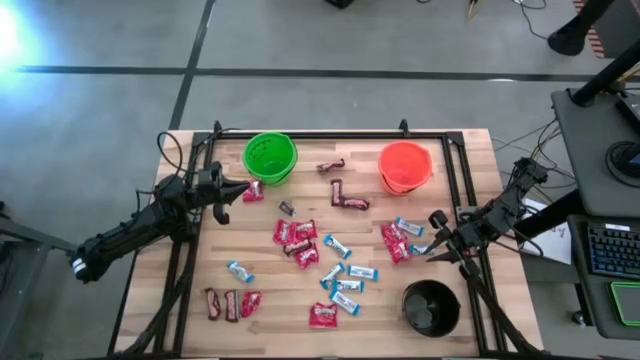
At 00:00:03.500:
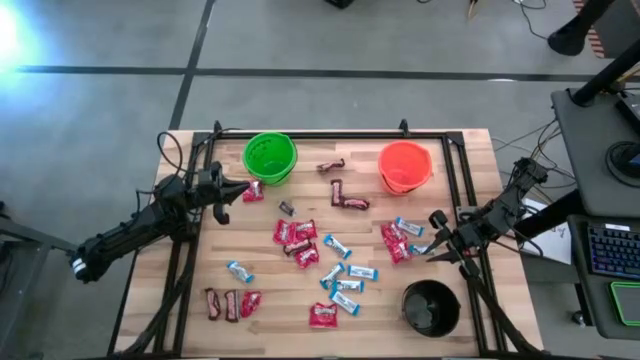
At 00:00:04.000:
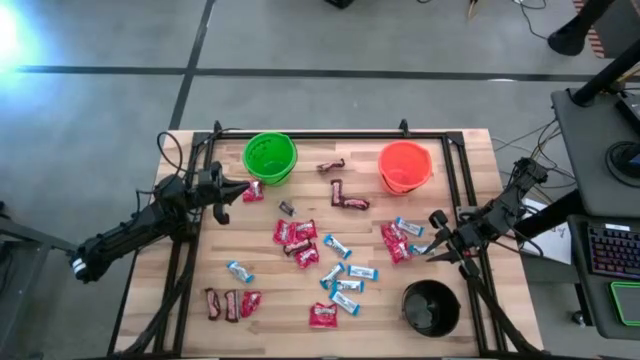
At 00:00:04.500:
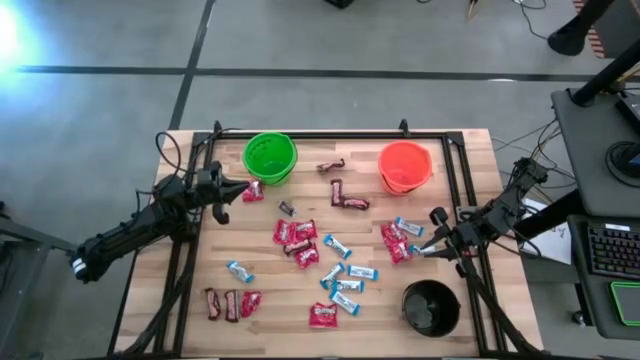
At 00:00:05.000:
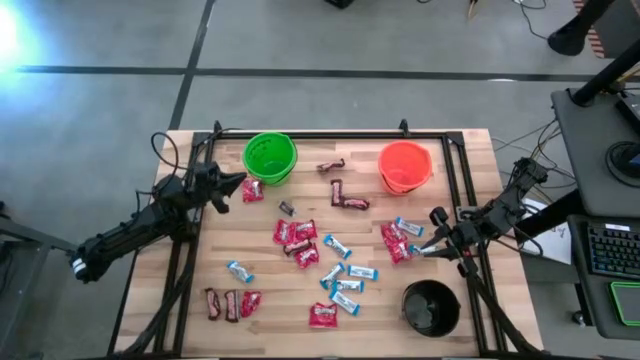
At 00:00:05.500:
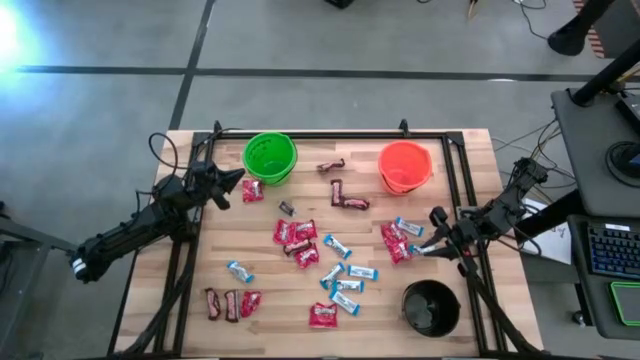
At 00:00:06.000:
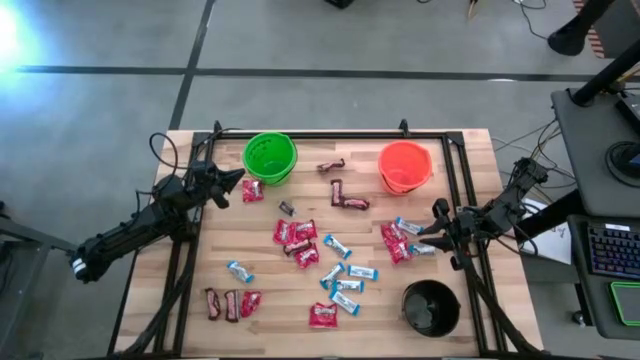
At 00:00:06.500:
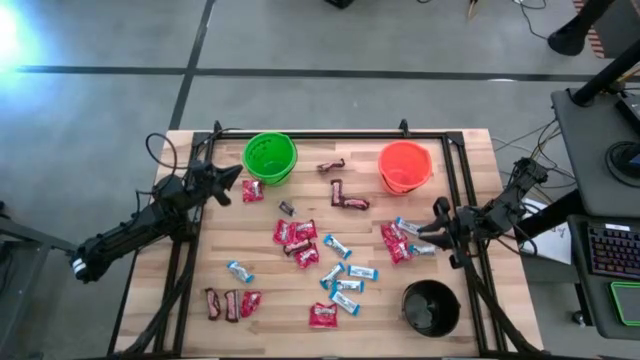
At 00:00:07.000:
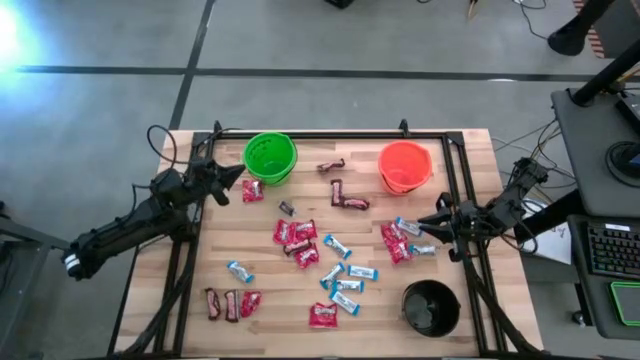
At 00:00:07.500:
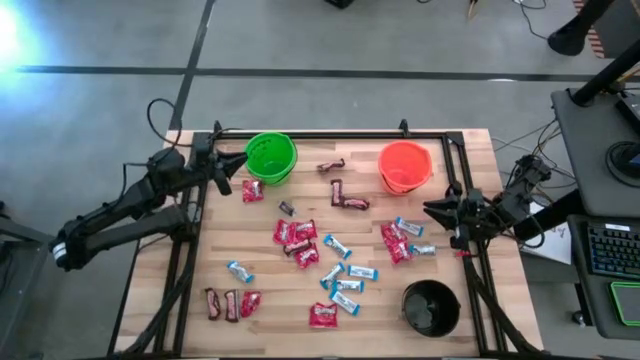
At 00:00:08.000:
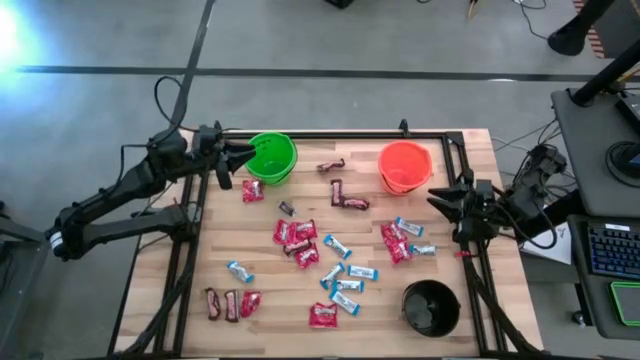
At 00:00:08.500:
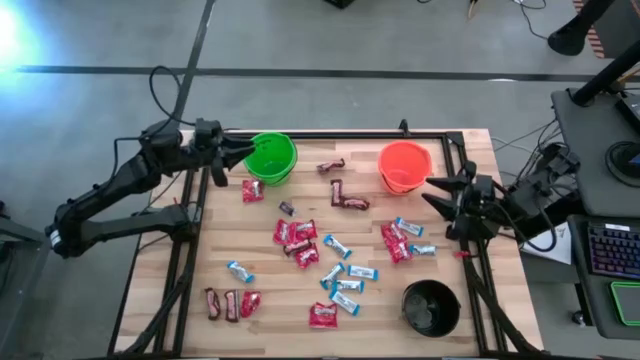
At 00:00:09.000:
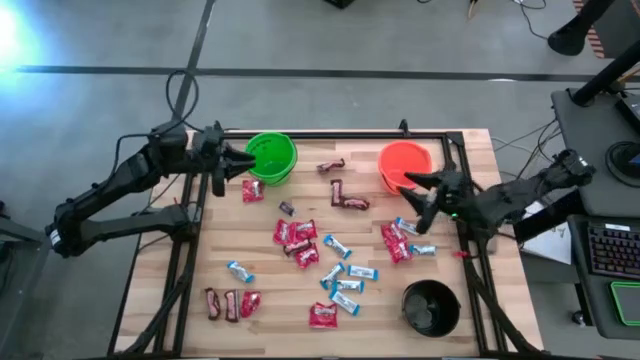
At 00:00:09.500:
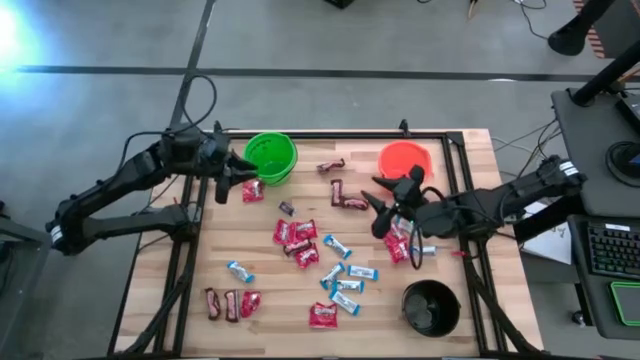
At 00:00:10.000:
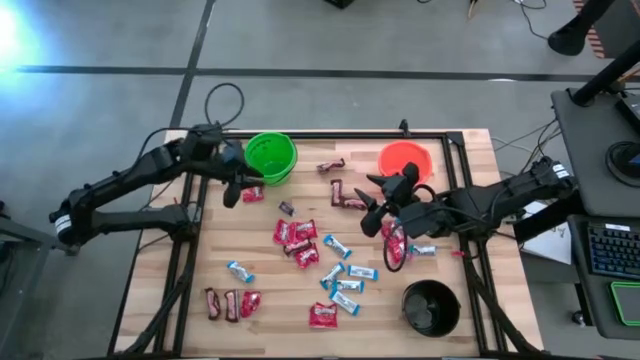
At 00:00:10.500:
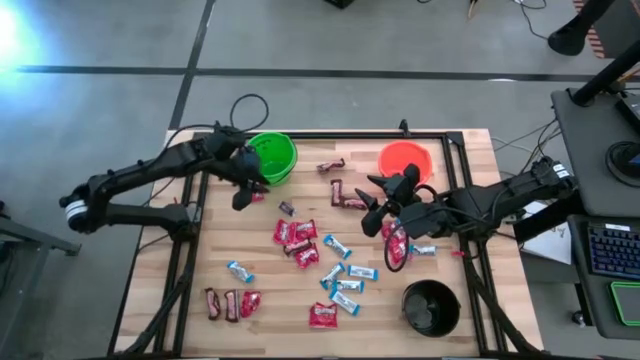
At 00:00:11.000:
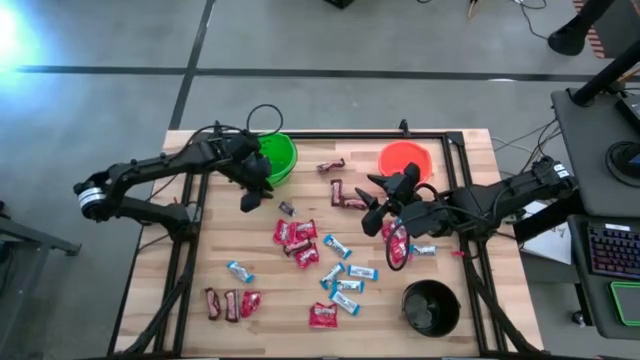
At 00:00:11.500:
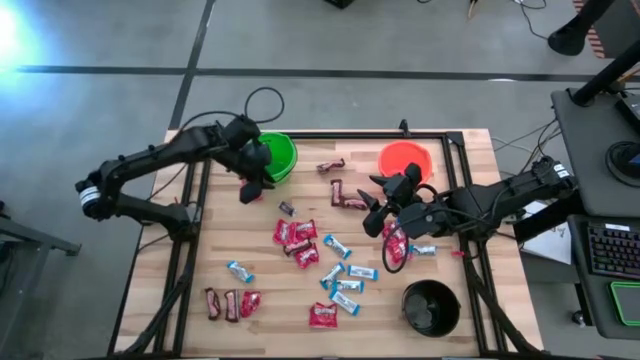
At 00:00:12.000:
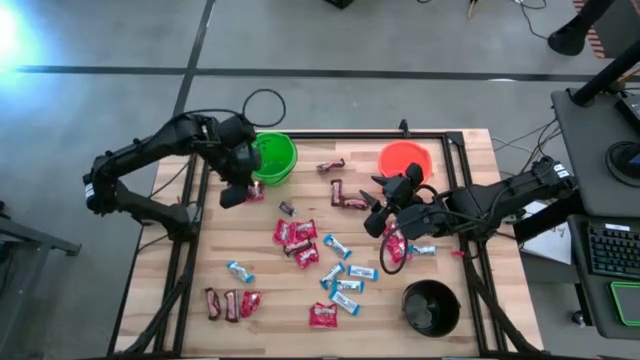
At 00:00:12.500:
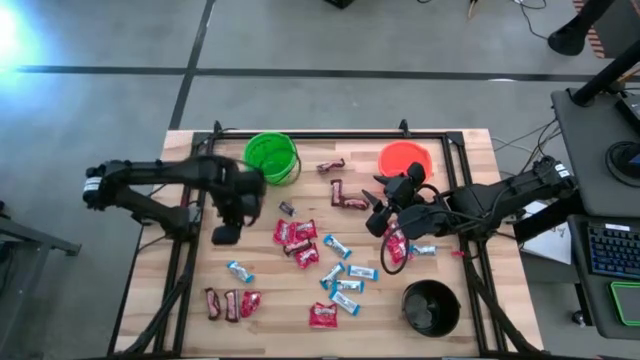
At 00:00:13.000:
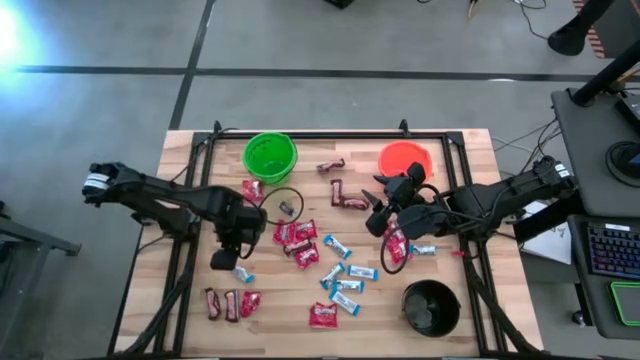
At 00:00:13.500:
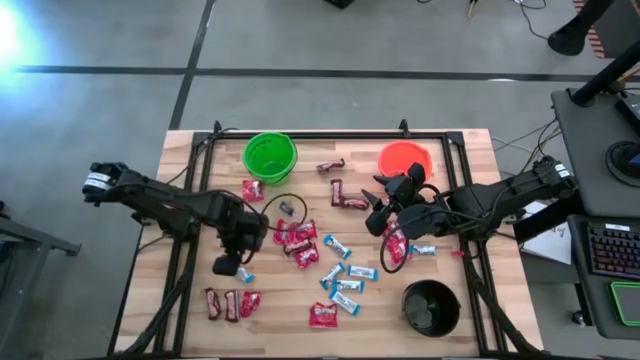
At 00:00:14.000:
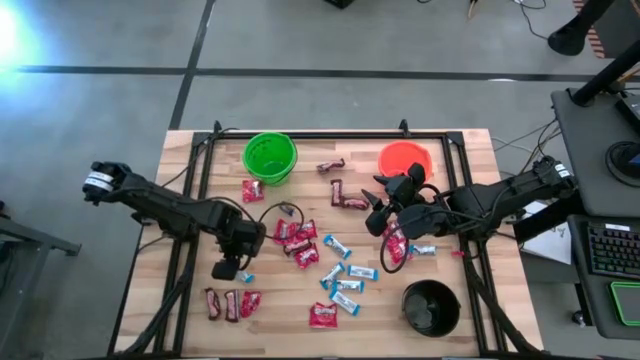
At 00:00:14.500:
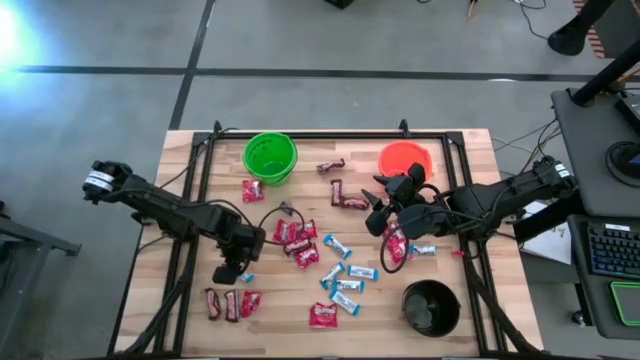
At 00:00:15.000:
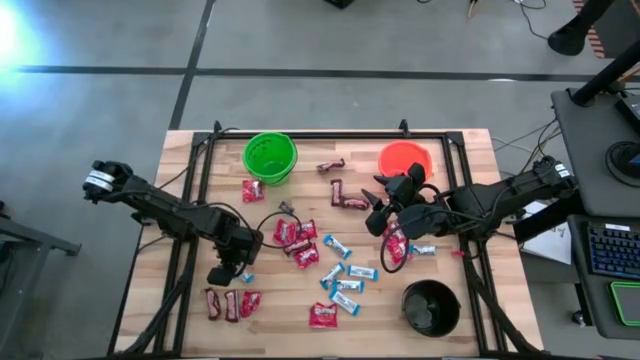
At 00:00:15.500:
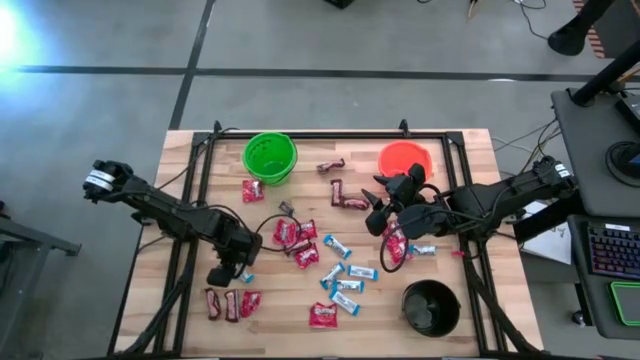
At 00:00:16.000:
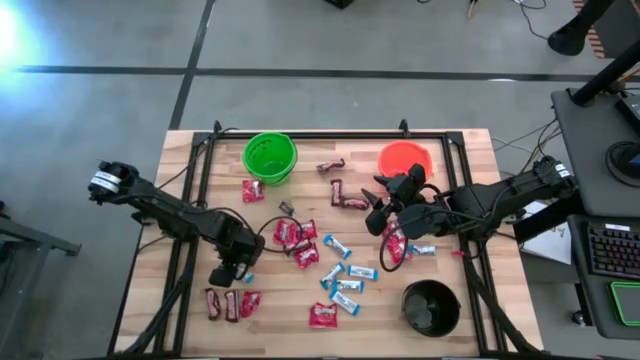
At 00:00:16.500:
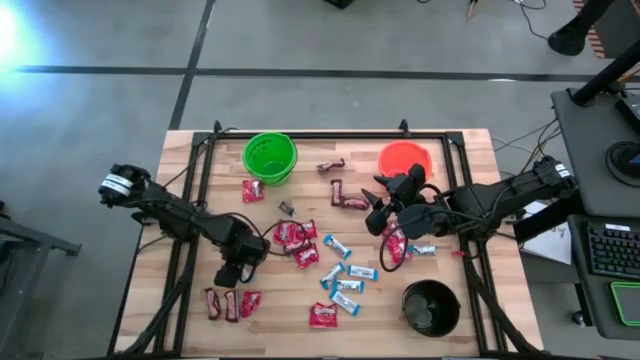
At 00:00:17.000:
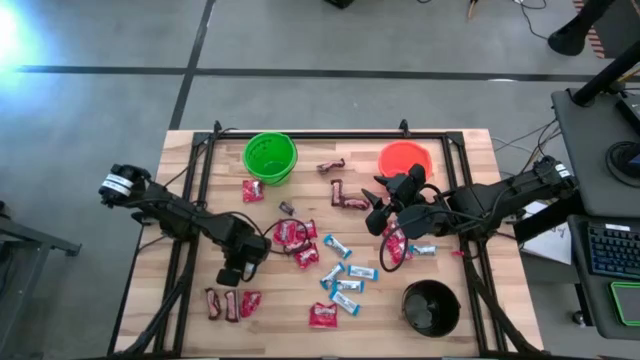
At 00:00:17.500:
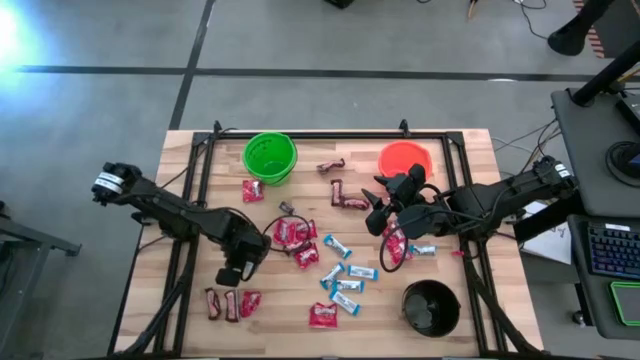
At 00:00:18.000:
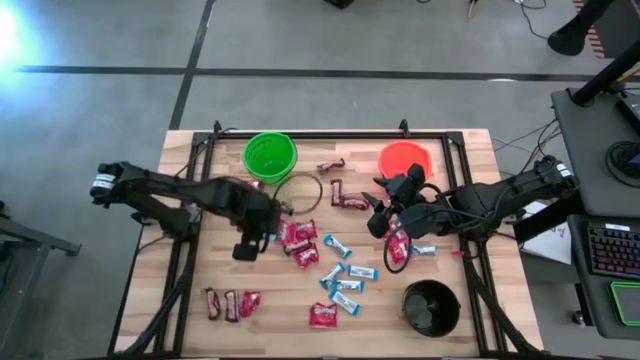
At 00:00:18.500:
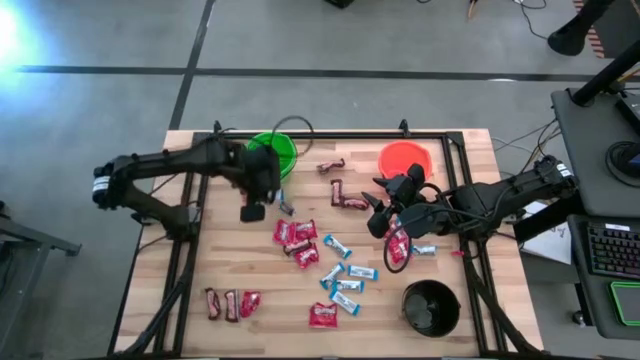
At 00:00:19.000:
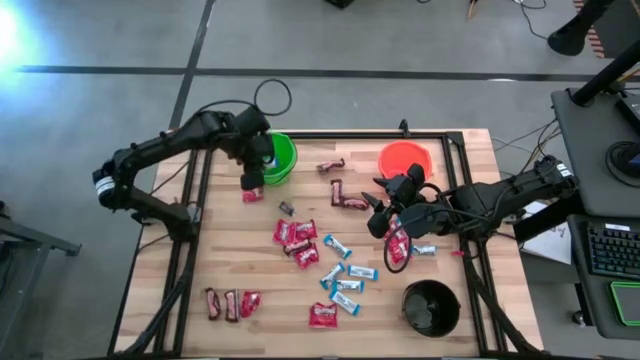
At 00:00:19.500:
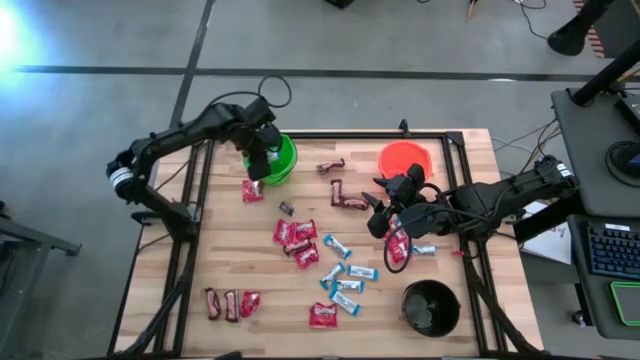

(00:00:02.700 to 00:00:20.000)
Task: Sort candy
Put the white candy into the green bucket
